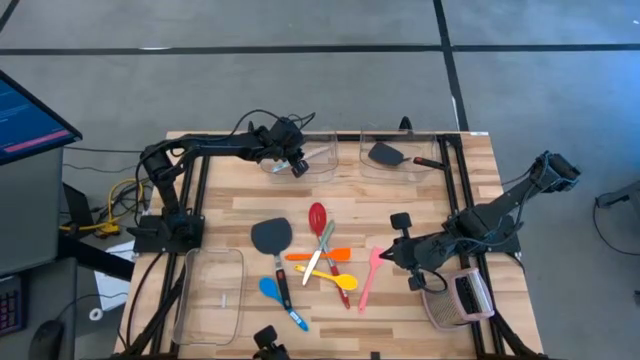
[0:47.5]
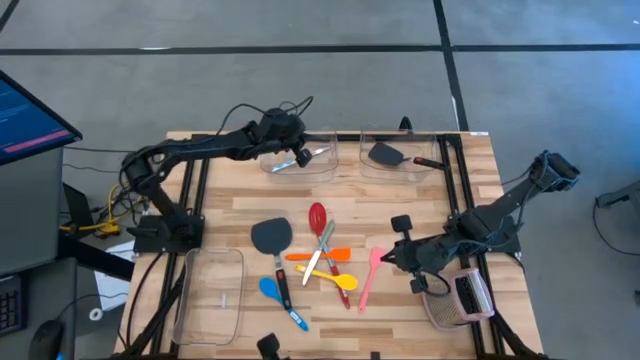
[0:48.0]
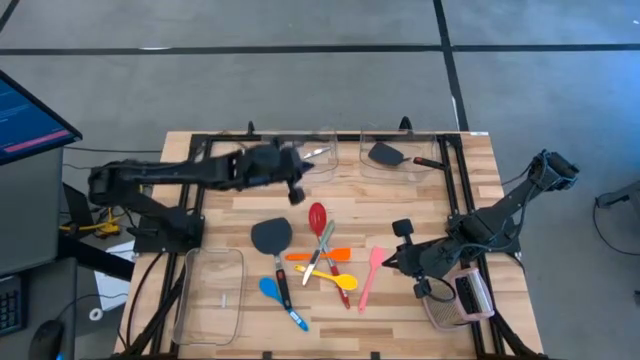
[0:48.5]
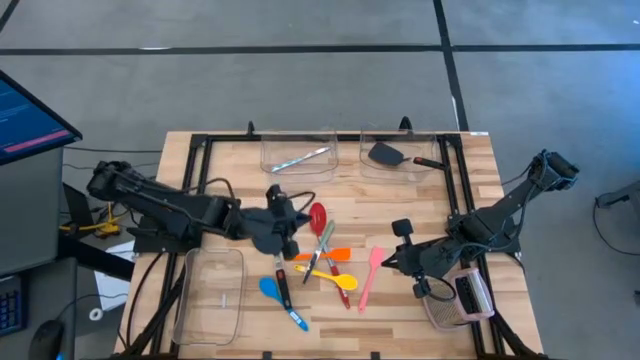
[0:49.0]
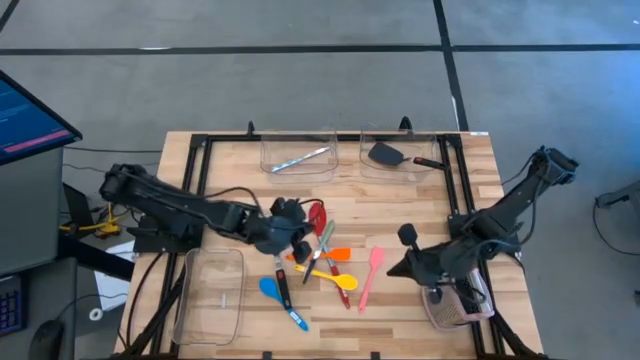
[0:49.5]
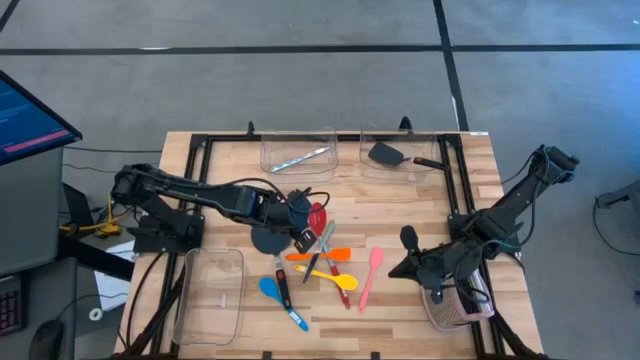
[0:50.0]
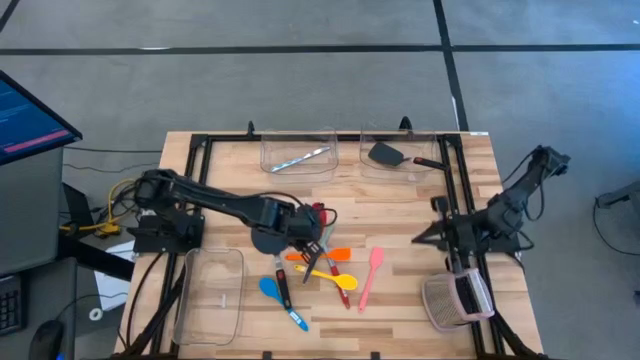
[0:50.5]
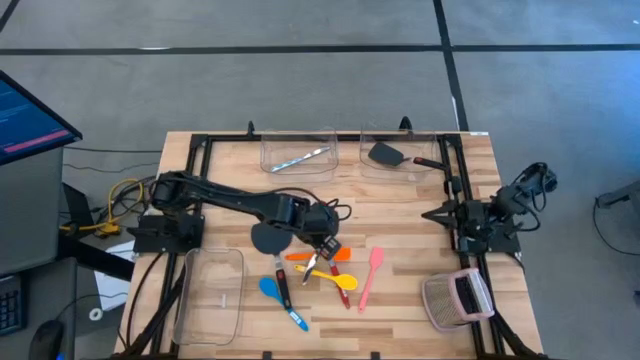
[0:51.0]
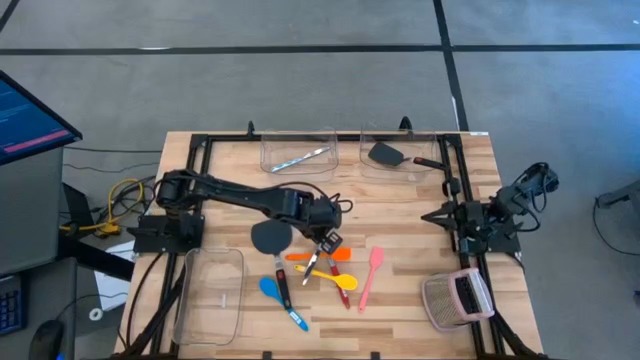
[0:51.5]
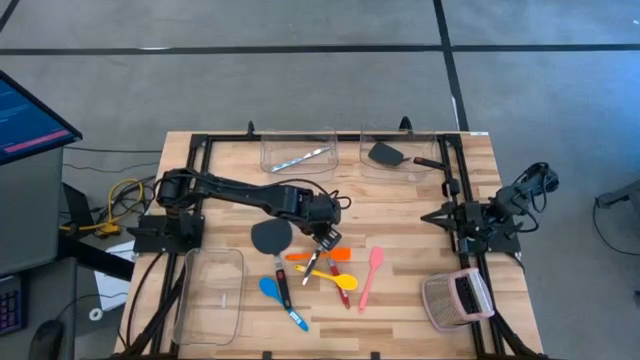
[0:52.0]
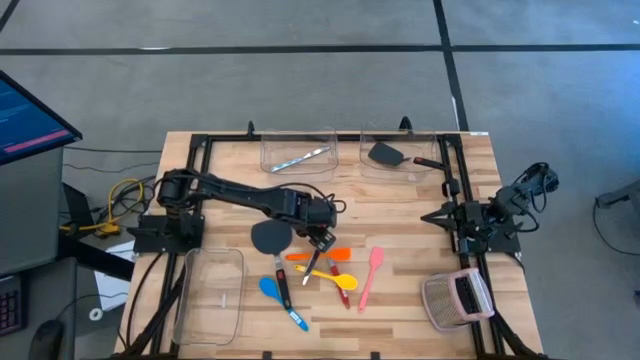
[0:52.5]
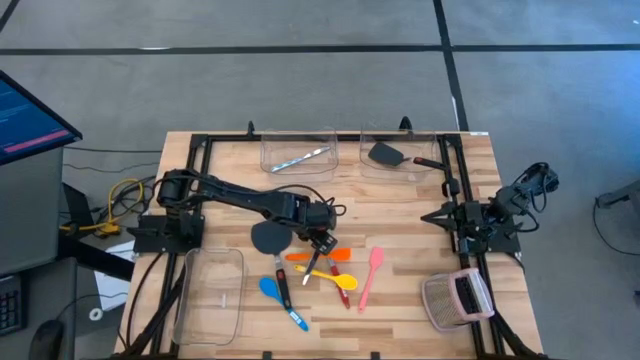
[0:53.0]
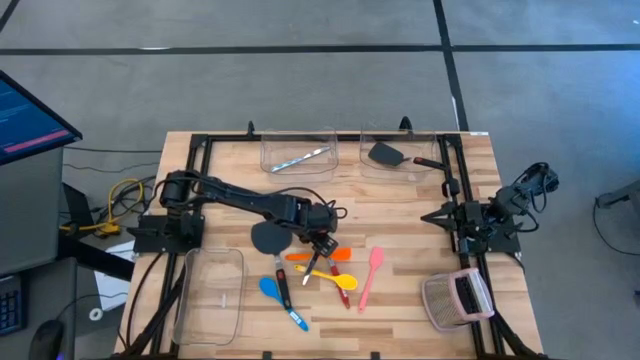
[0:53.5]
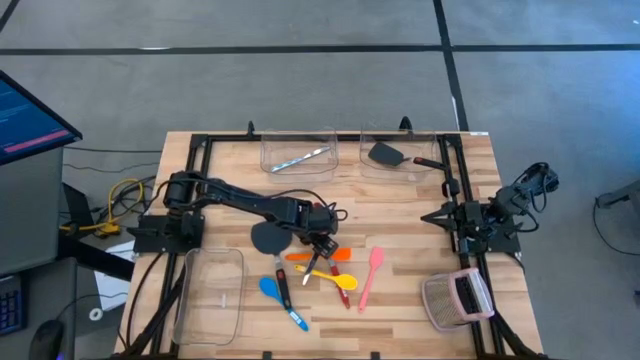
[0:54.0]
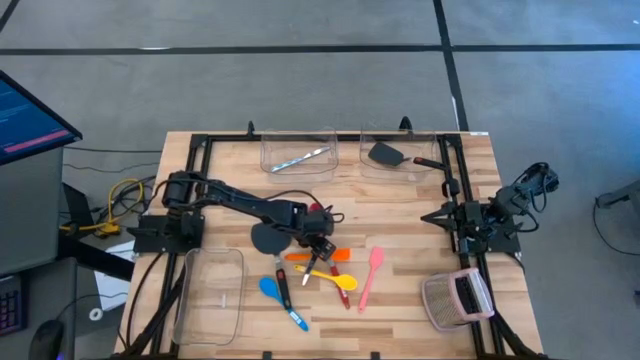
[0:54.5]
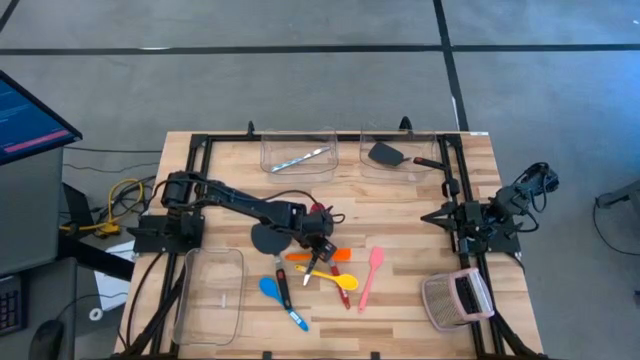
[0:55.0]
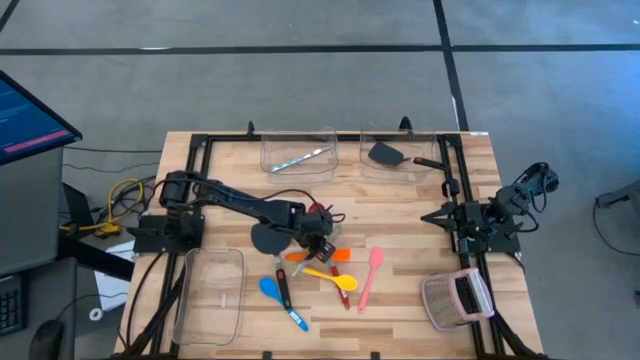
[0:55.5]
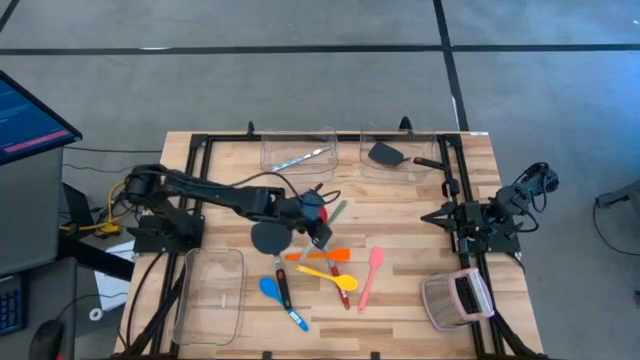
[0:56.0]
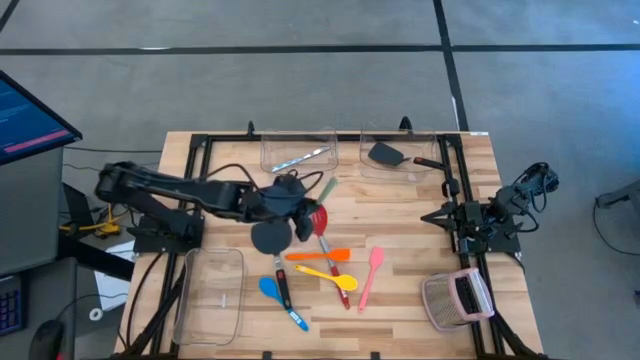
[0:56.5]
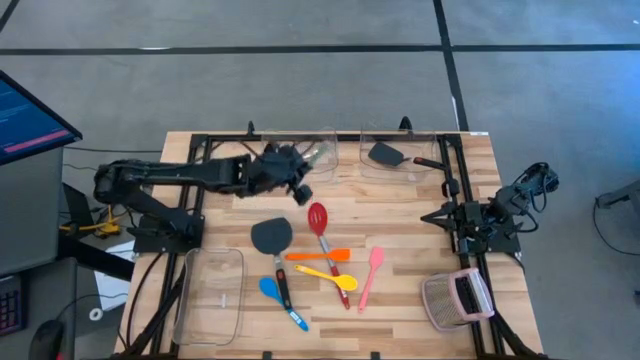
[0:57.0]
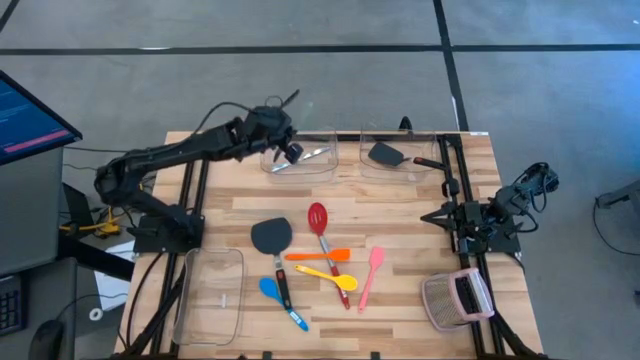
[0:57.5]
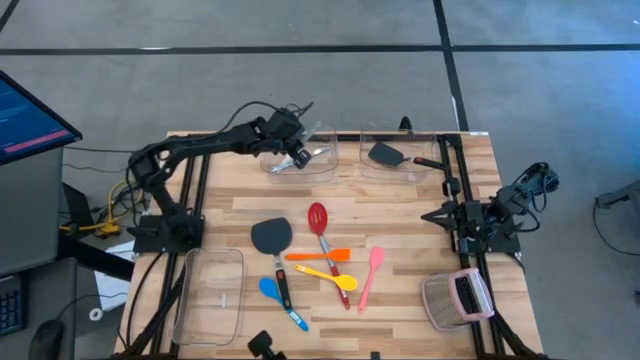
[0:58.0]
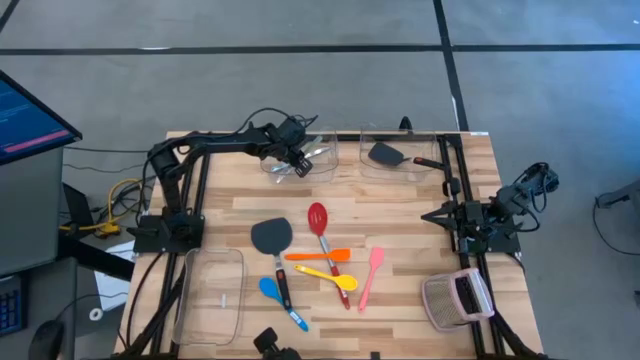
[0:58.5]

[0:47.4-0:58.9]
Task: Pick & Place Kitchen Items
Put the green table knife into the top left transparent bin
